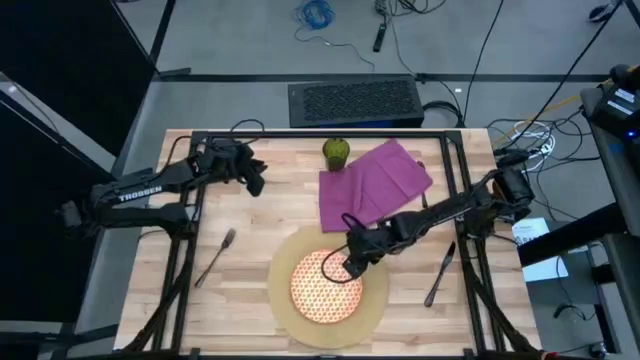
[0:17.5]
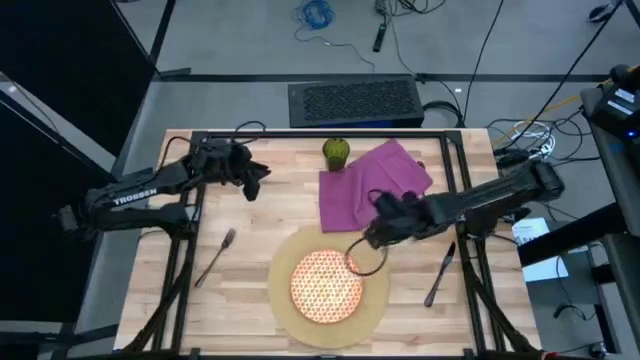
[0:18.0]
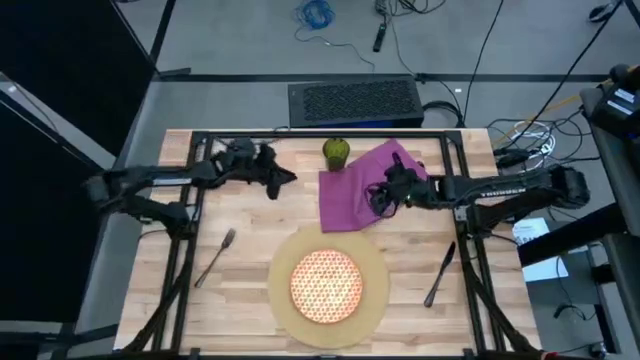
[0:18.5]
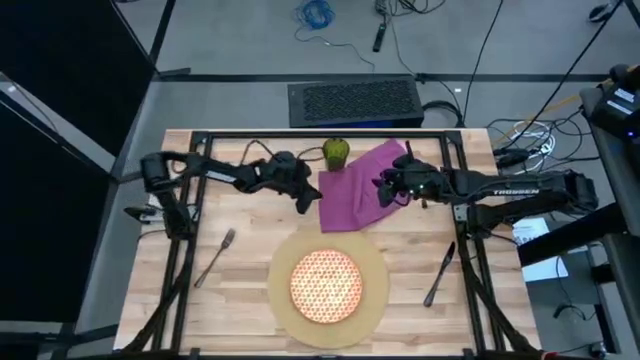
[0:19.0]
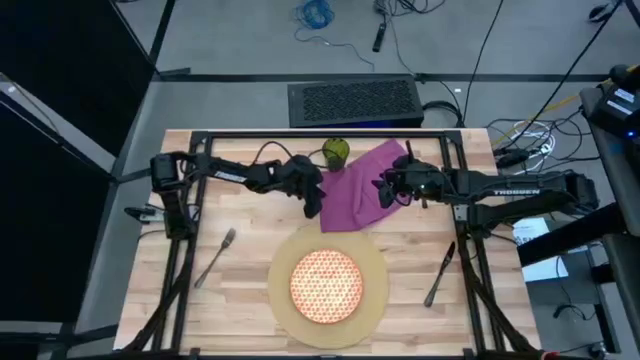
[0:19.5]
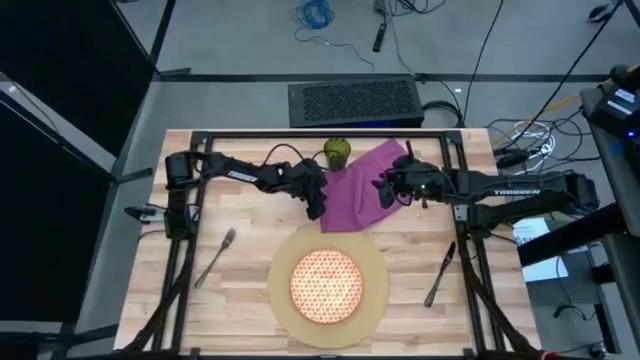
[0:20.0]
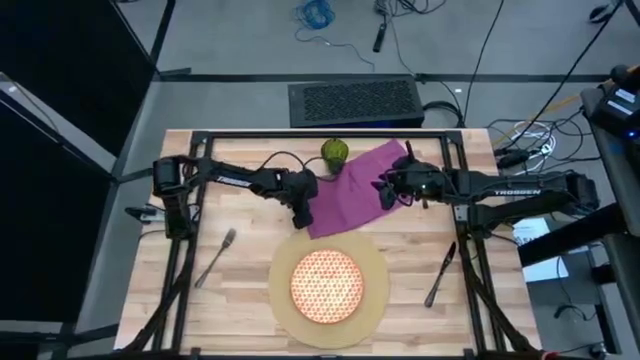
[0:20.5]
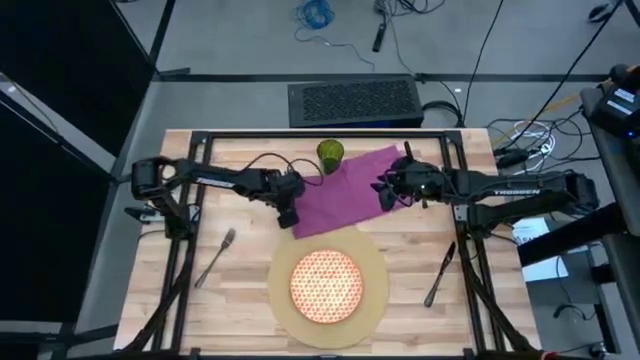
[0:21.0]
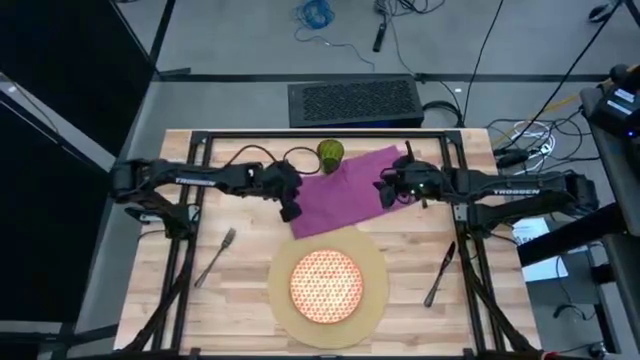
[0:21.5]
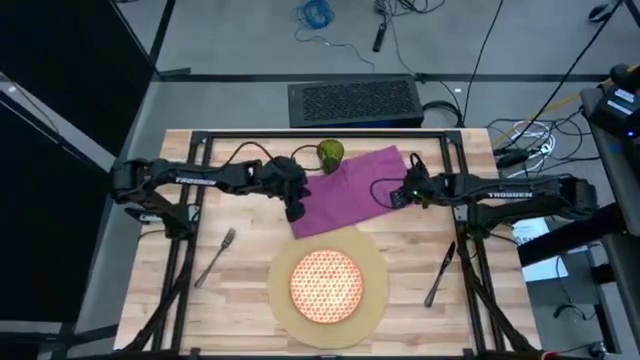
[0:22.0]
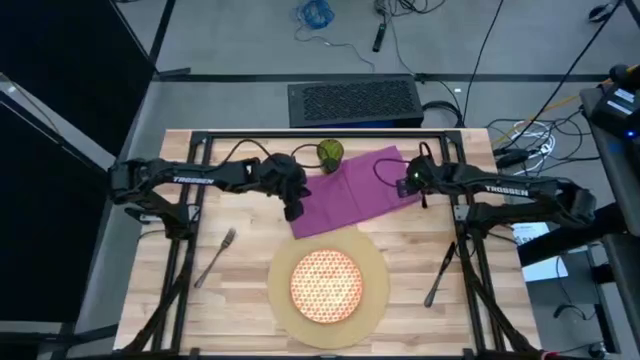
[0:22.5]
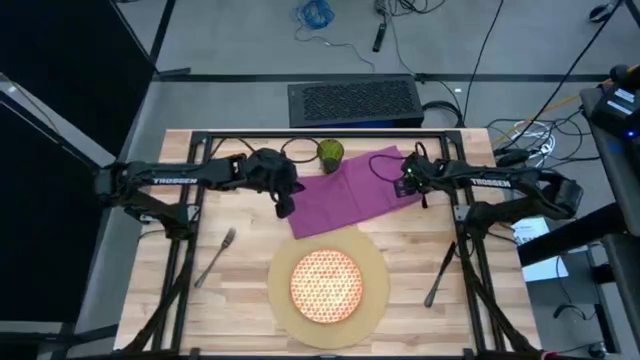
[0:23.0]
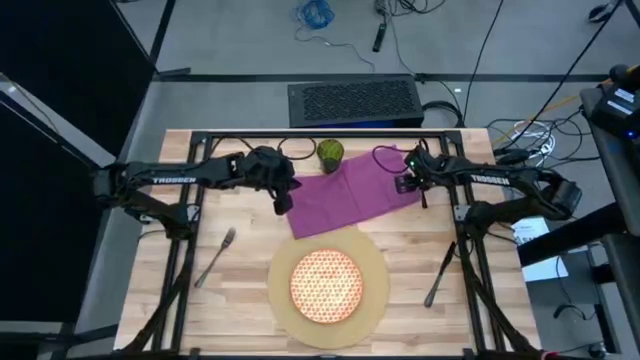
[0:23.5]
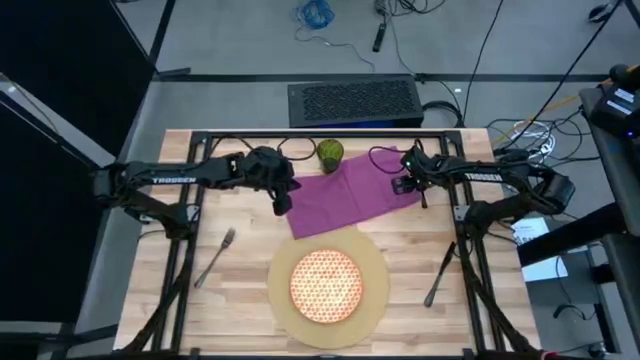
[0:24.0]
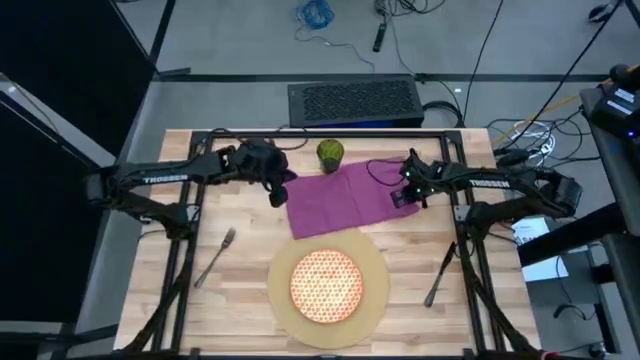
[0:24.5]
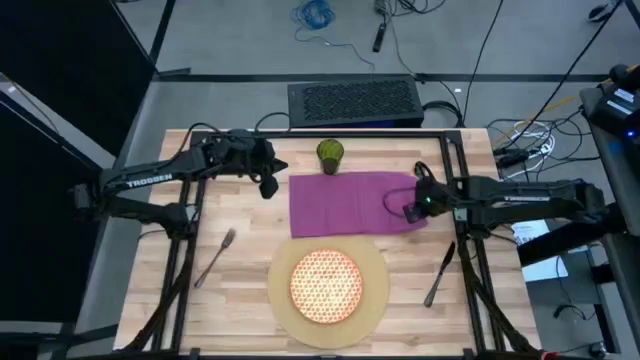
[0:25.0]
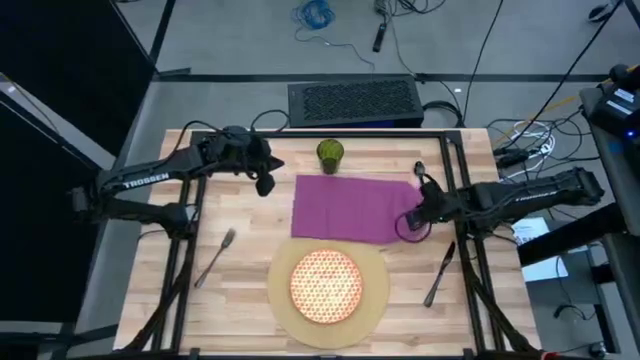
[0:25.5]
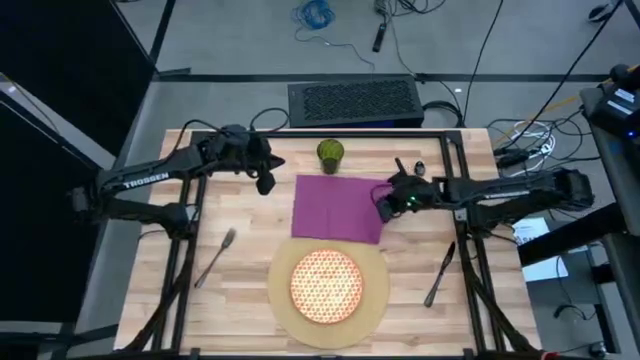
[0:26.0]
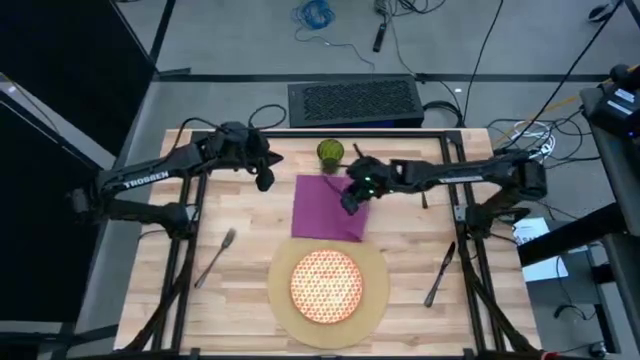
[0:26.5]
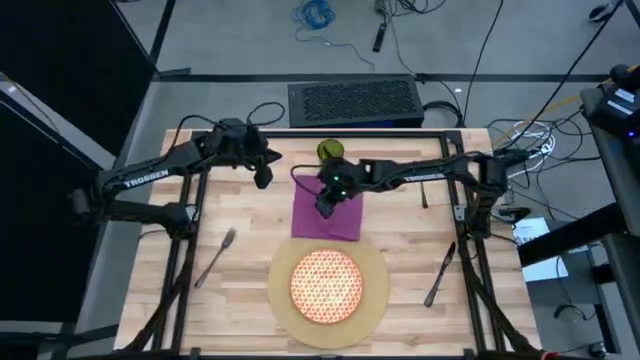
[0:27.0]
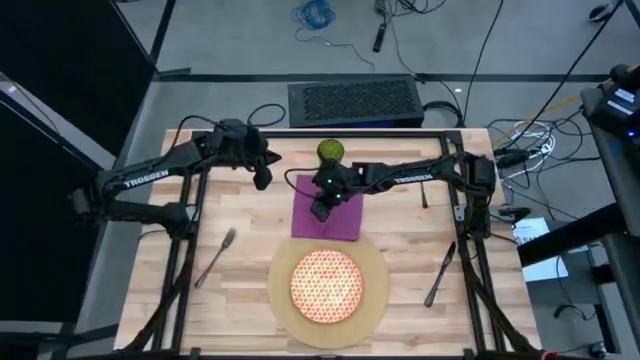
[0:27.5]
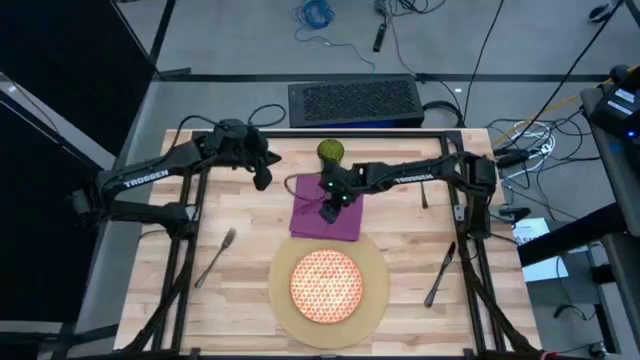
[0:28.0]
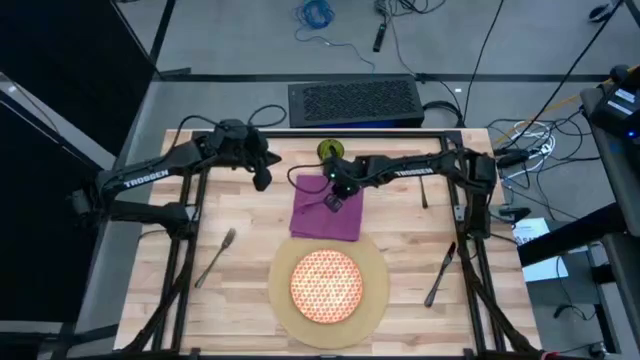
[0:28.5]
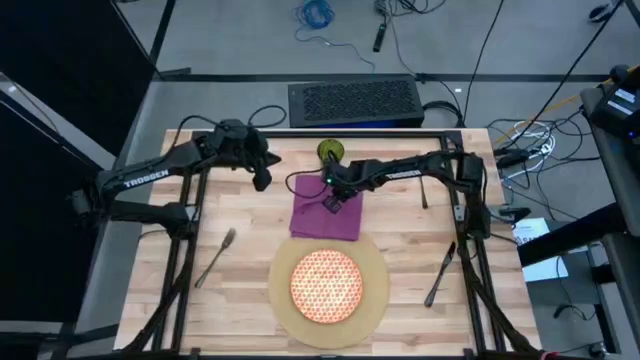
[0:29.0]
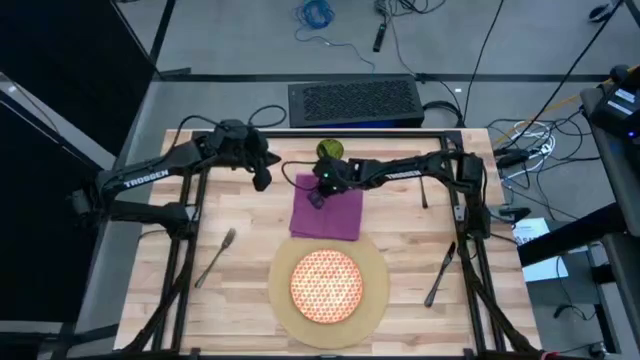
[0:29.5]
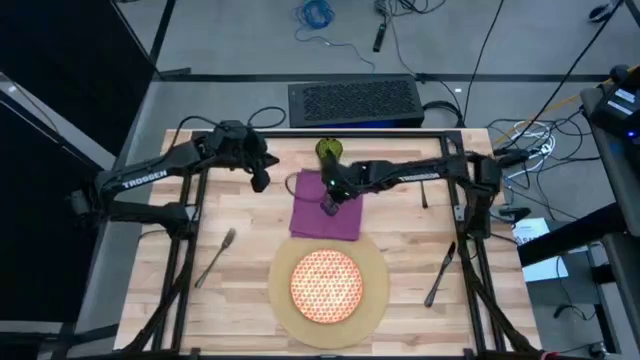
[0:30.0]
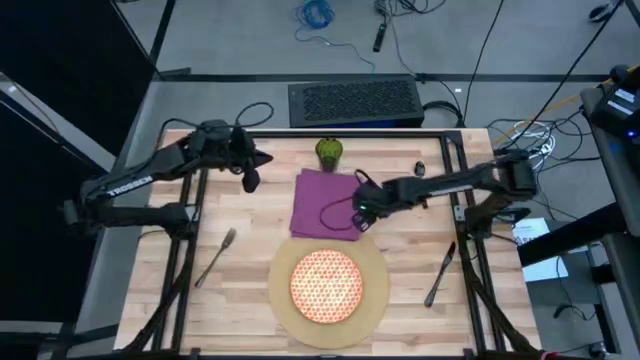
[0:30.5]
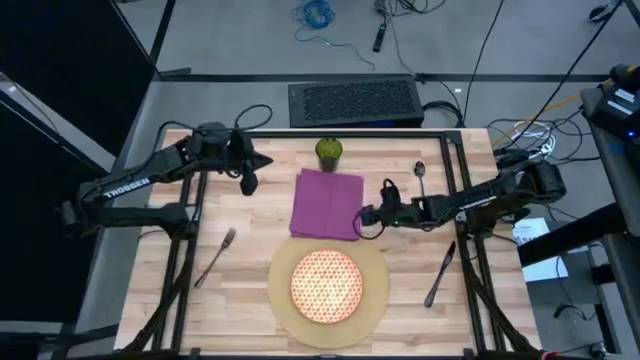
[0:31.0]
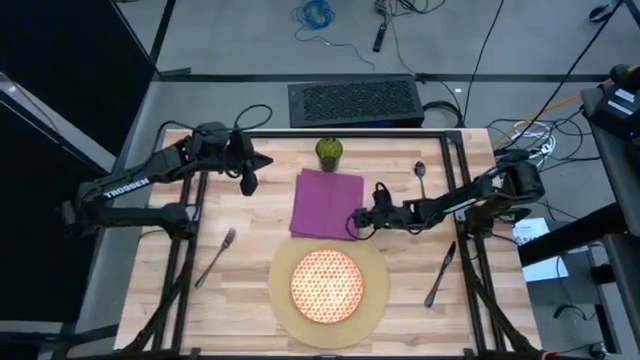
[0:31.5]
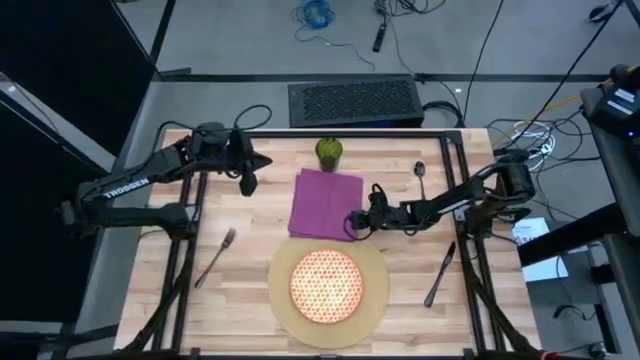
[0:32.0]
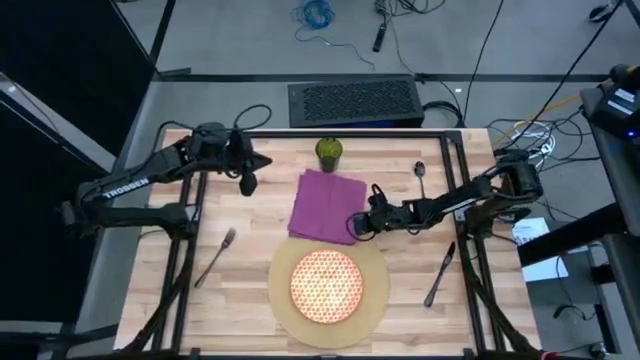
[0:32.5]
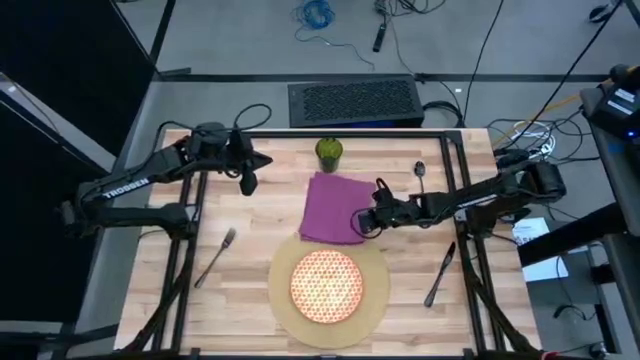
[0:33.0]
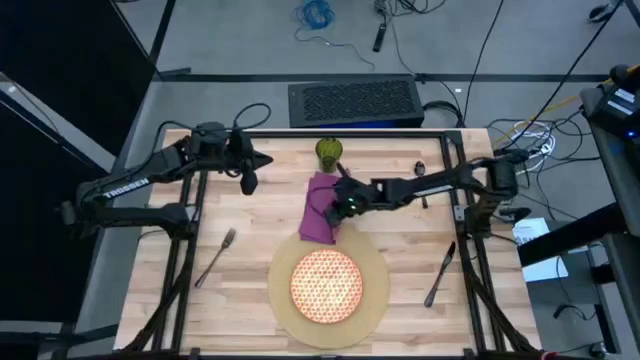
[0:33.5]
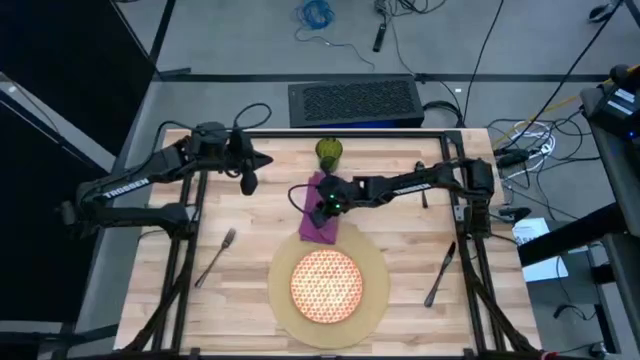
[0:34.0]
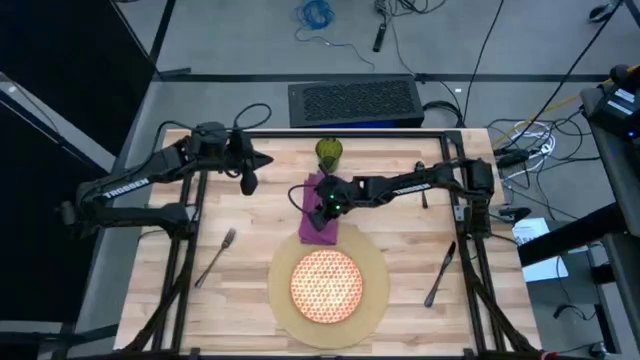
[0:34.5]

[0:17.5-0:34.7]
Task: Set table place
Fold the purple napkin

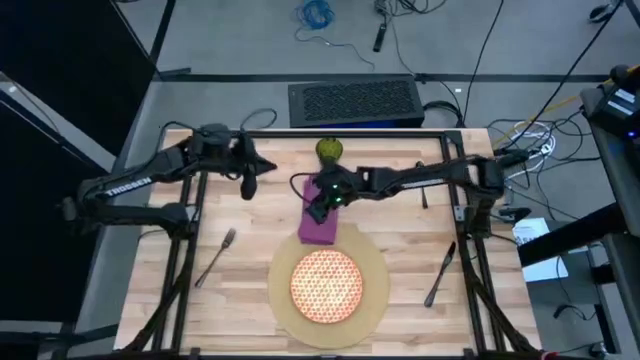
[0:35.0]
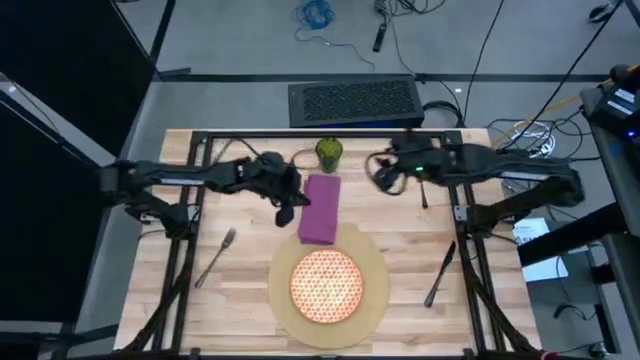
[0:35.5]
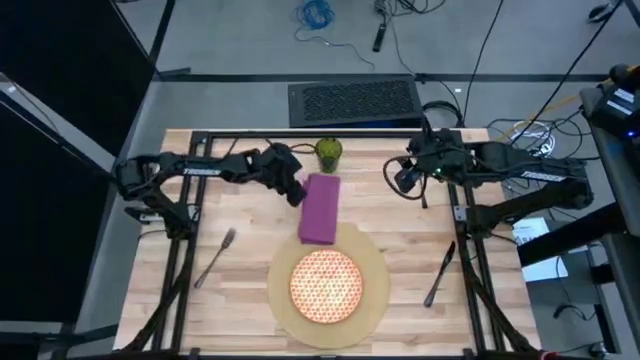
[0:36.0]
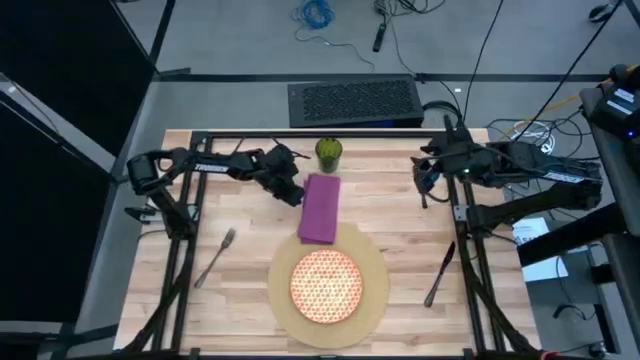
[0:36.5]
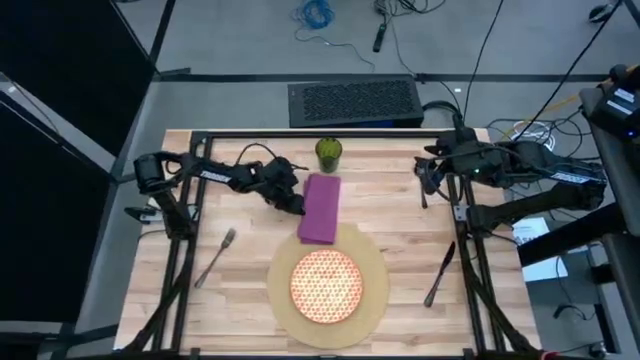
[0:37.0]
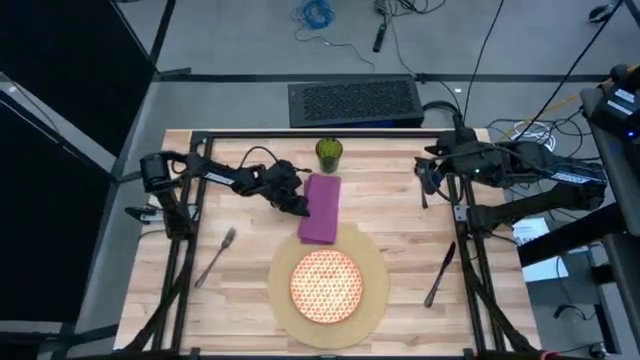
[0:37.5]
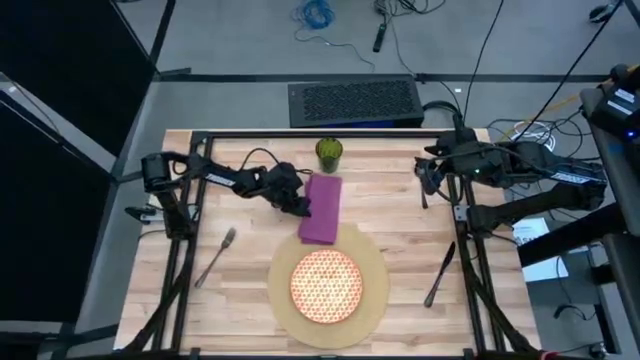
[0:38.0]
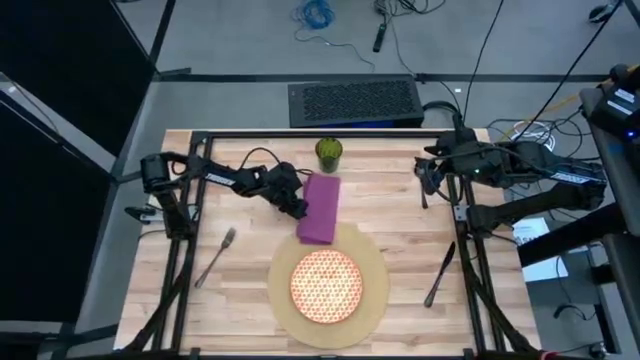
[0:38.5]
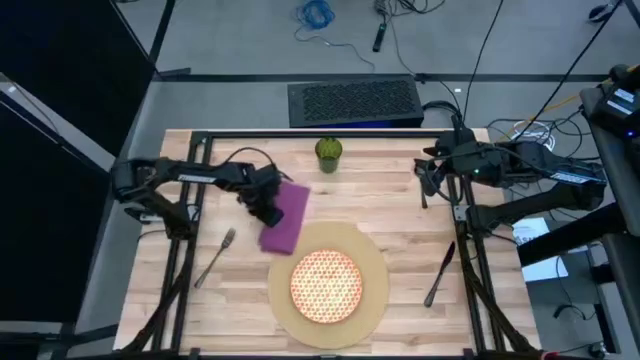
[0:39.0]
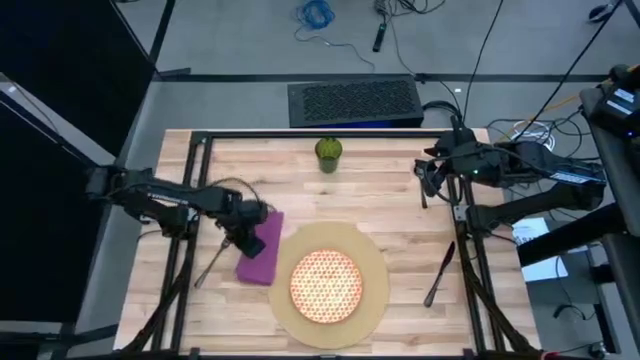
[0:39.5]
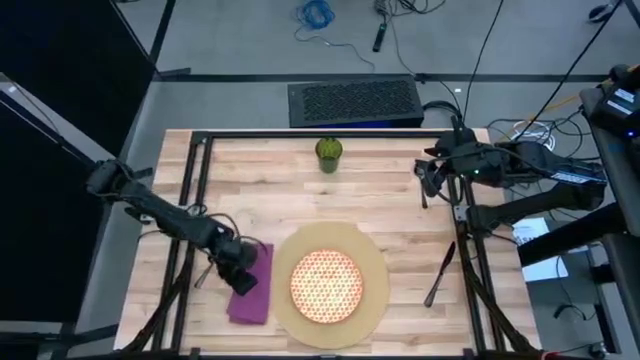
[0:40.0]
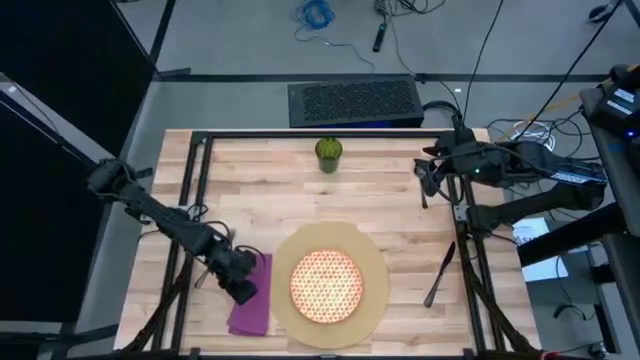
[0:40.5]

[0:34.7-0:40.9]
Move the purple napkin to the left of the brown placemat
